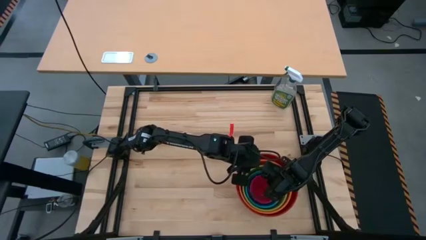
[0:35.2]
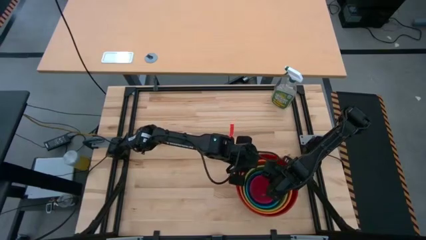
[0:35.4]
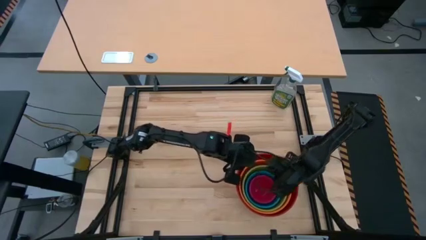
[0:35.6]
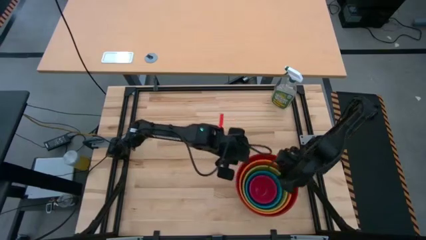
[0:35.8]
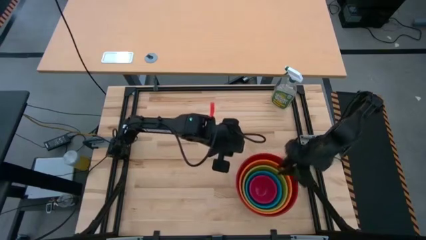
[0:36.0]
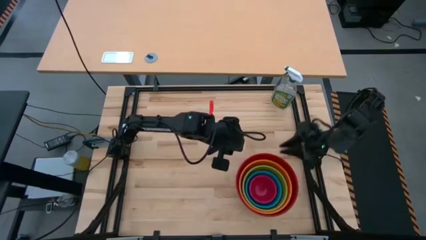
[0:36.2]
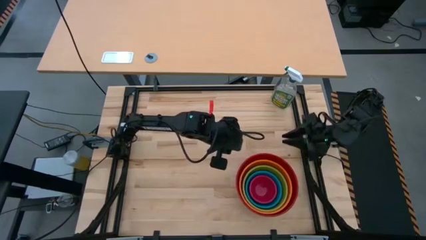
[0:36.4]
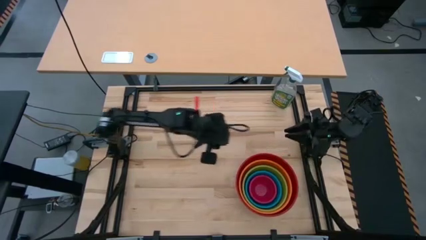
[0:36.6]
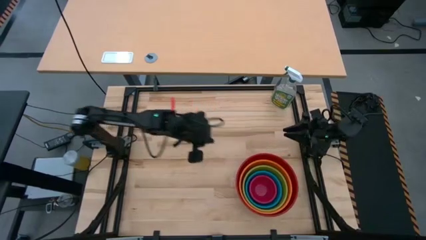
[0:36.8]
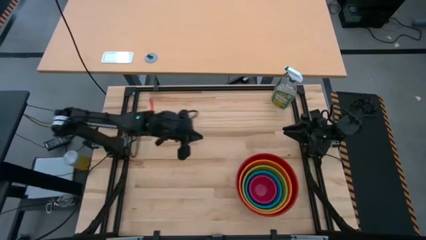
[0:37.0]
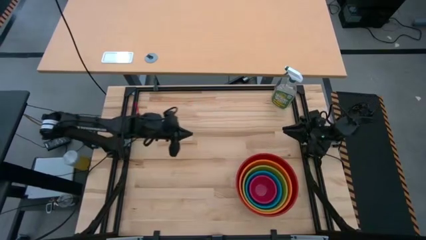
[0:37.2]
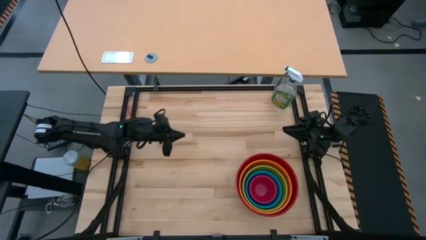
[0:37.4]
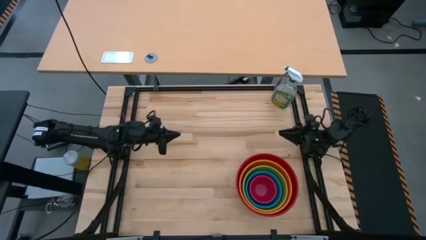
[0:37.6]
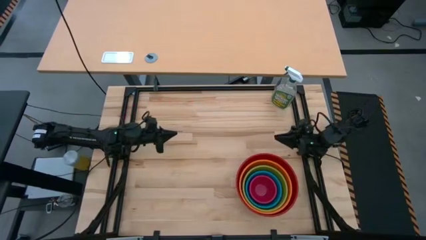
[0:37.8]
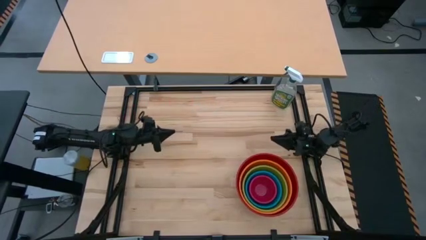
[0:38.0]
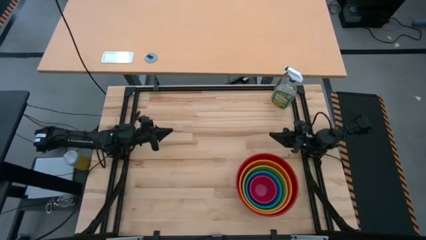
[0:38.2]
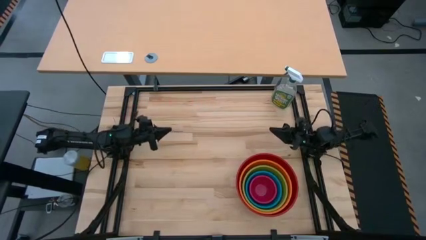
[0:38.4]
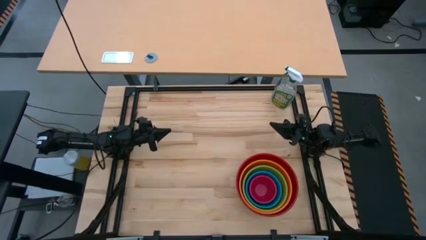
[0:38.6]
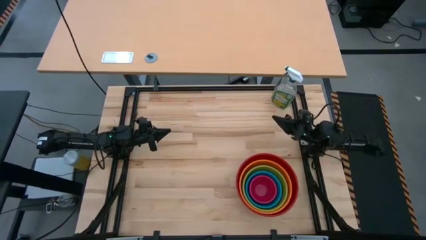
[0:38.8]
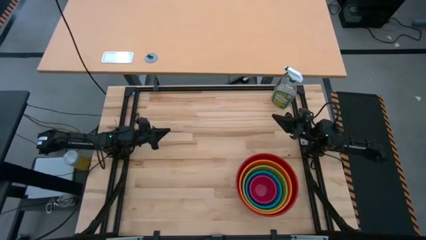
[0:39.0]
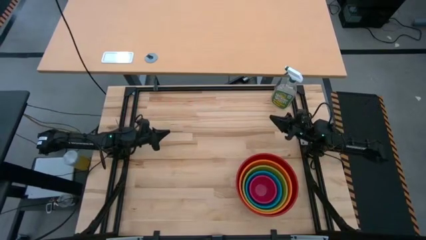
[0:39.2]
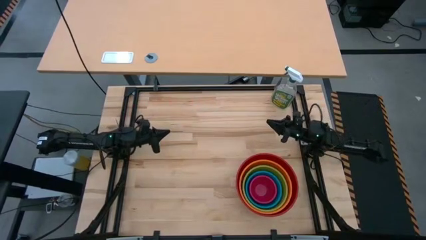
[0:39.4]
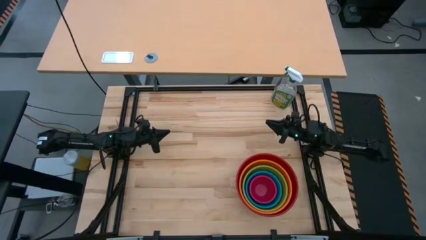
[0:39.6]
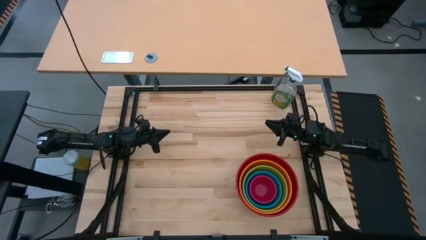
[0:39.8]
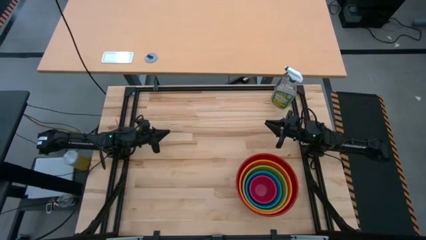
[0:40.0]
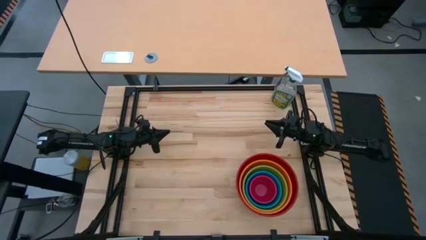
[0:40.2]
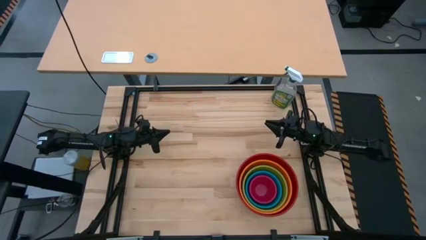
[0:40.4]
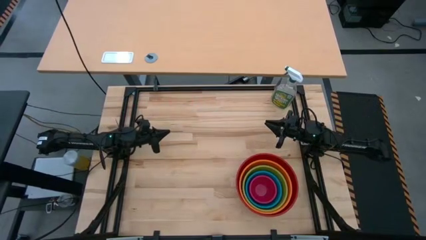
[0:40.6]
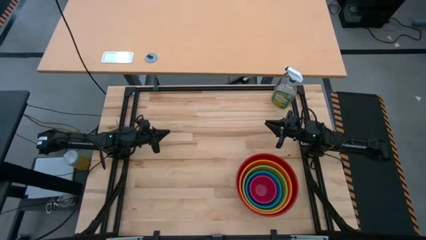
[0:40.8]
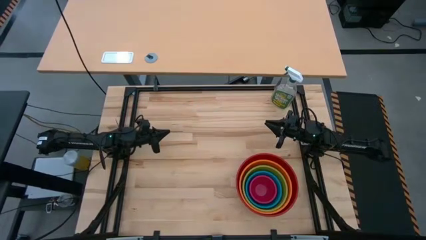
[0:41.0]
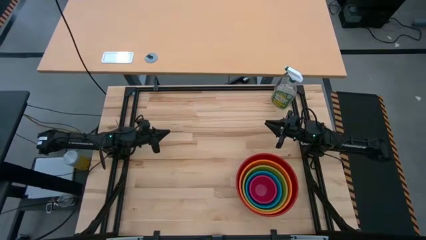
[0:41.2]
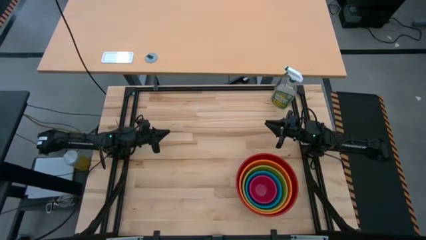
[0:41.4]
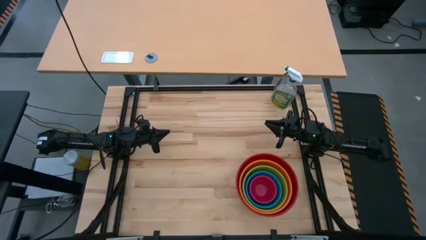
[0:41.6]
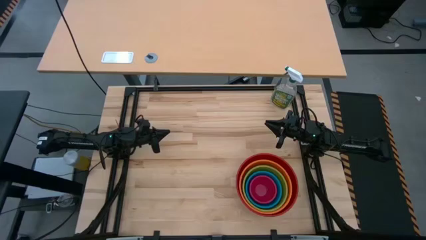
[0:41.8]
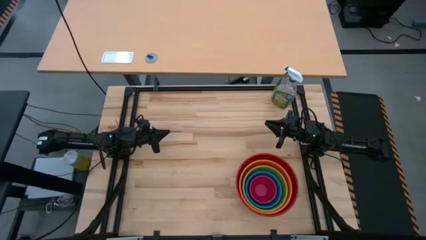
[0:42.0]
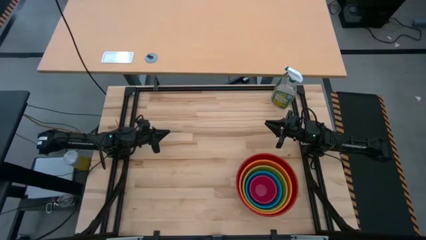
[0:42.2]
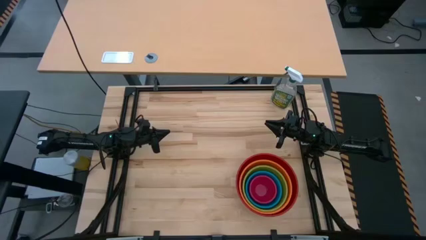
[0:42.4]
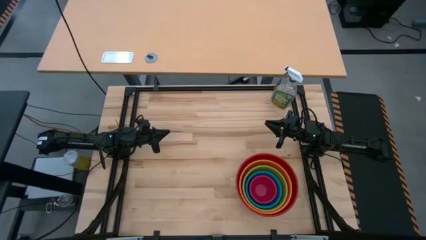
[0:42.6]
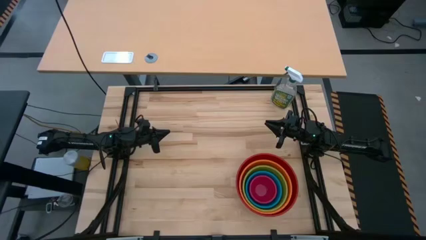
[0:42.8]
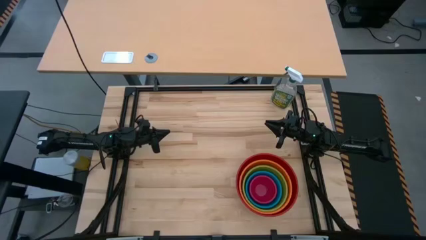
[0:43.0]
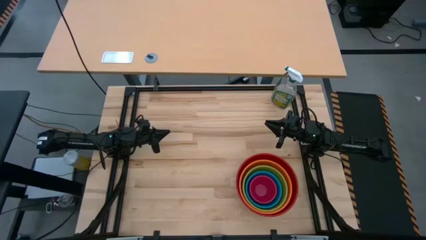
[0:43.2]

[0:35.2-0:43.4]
Task: Nest bowls inside each other by size order
Return to Home Position

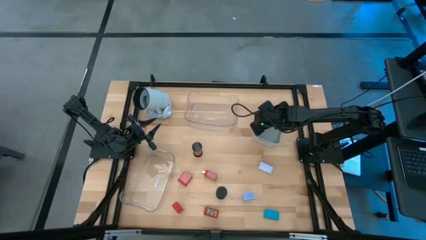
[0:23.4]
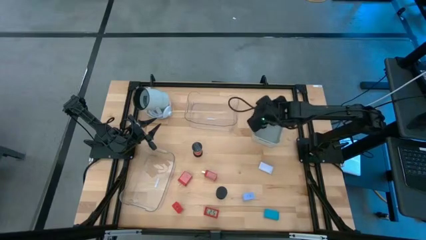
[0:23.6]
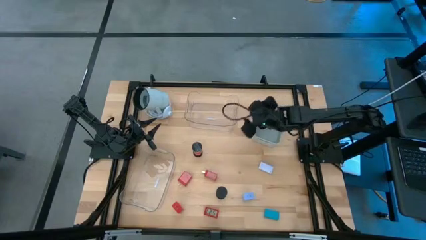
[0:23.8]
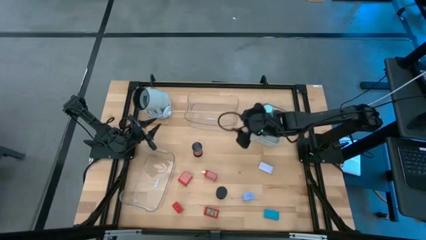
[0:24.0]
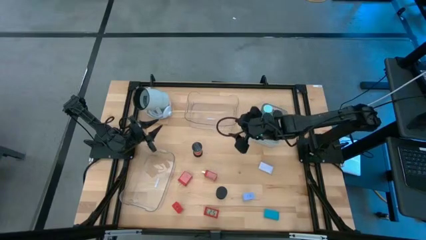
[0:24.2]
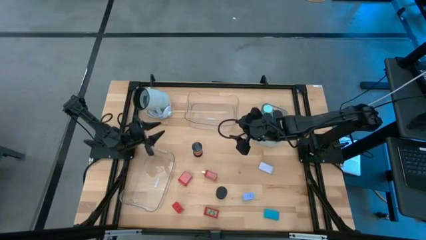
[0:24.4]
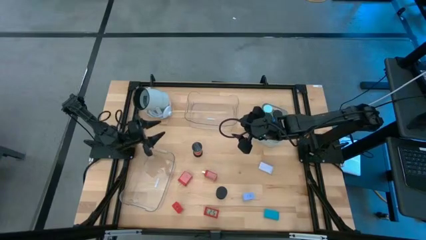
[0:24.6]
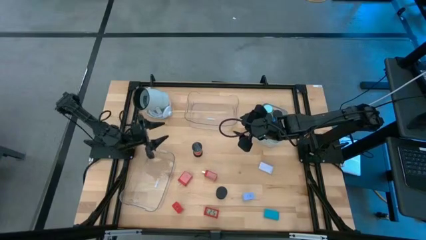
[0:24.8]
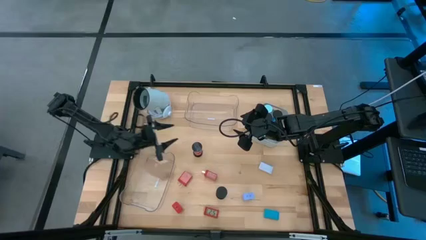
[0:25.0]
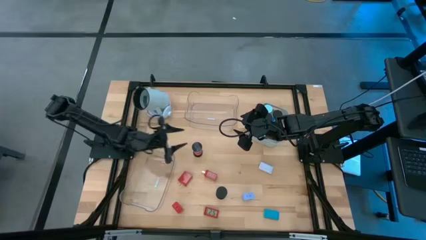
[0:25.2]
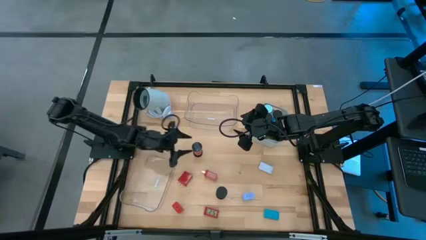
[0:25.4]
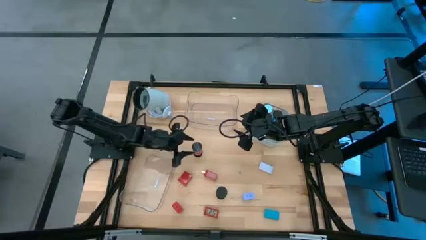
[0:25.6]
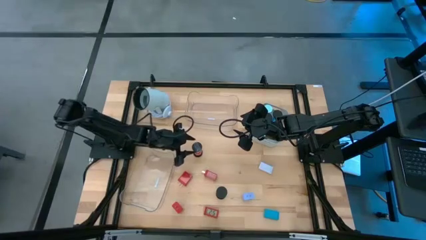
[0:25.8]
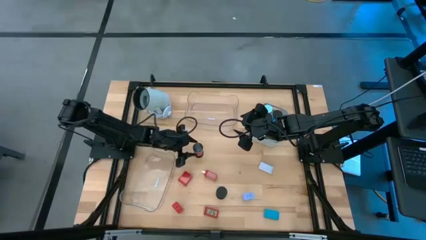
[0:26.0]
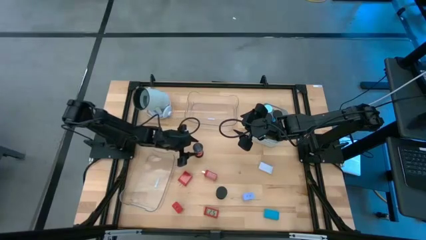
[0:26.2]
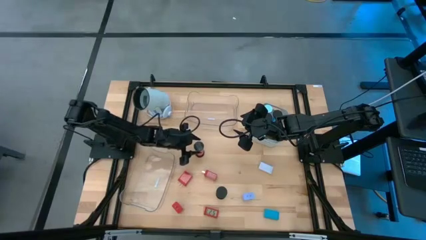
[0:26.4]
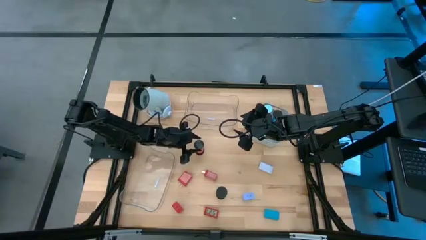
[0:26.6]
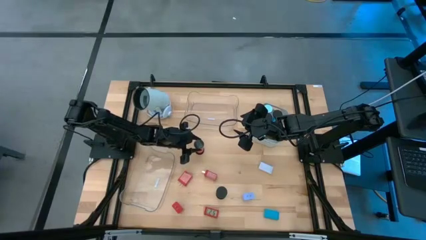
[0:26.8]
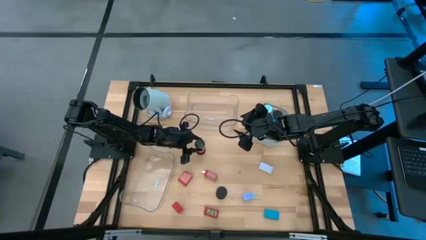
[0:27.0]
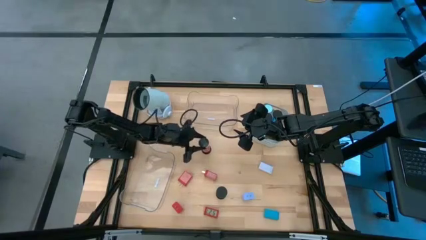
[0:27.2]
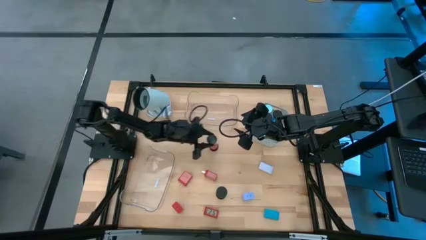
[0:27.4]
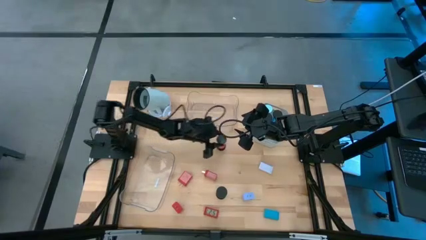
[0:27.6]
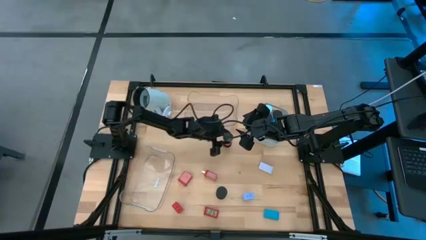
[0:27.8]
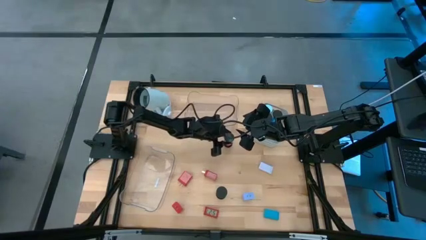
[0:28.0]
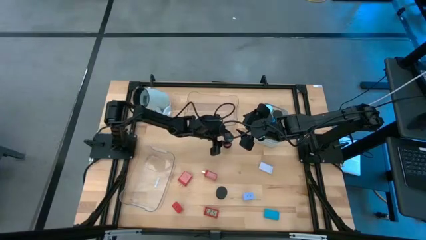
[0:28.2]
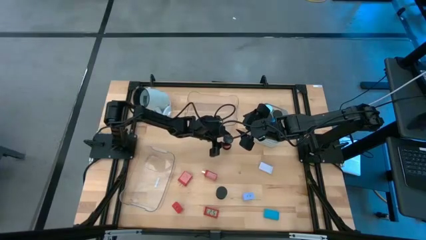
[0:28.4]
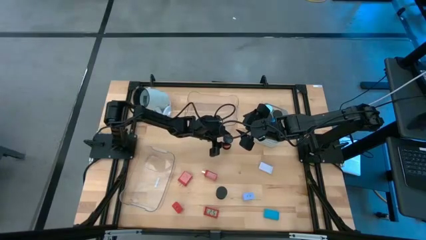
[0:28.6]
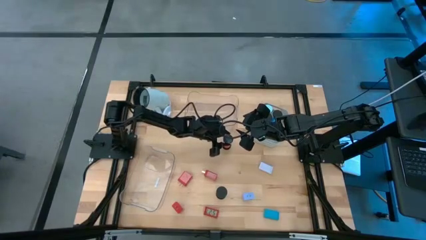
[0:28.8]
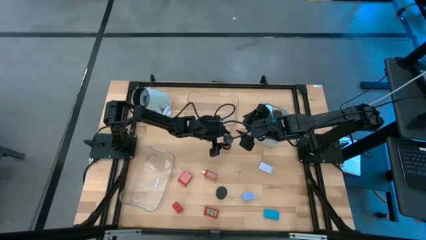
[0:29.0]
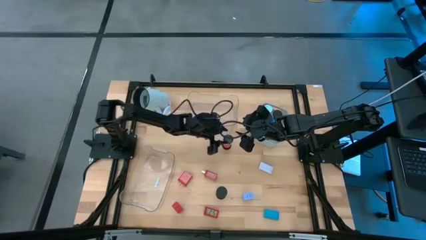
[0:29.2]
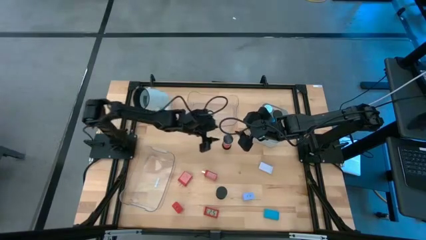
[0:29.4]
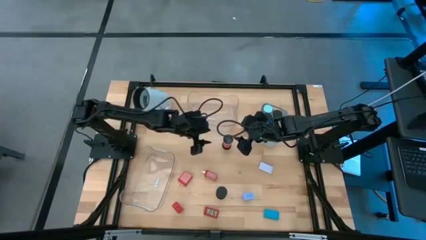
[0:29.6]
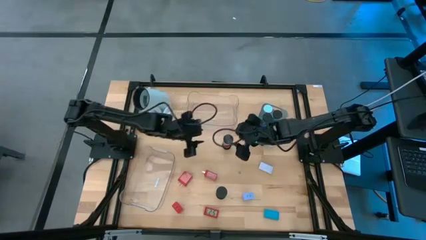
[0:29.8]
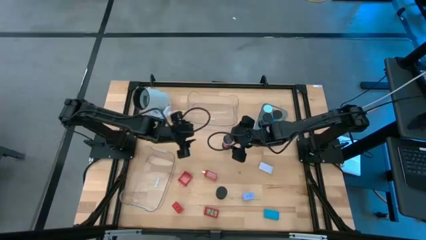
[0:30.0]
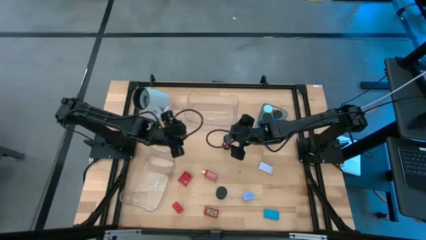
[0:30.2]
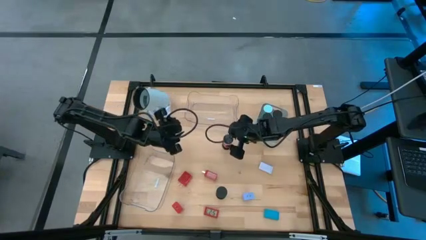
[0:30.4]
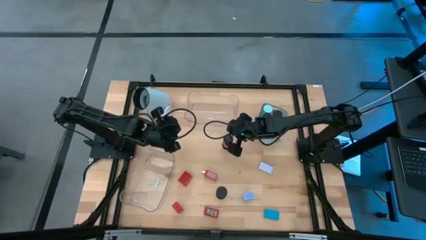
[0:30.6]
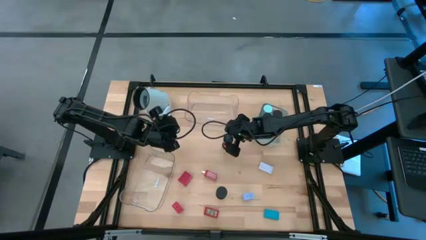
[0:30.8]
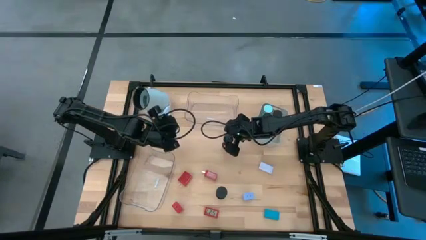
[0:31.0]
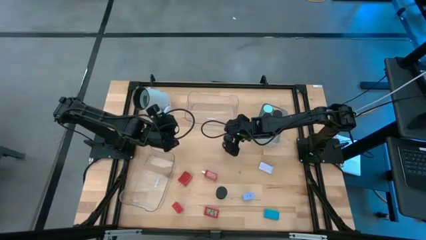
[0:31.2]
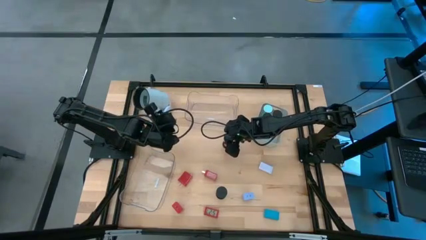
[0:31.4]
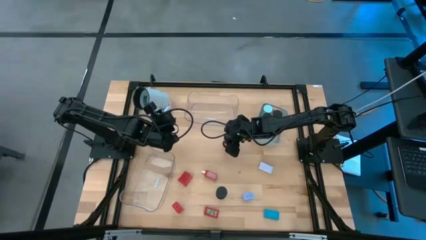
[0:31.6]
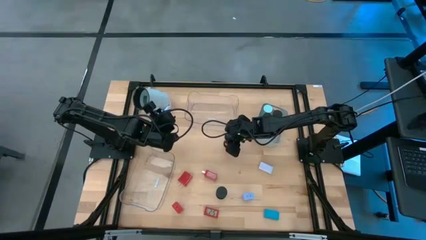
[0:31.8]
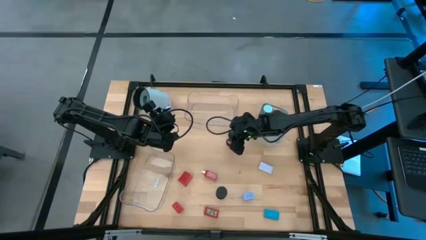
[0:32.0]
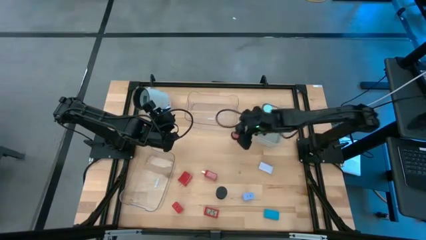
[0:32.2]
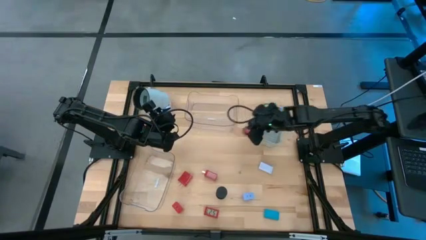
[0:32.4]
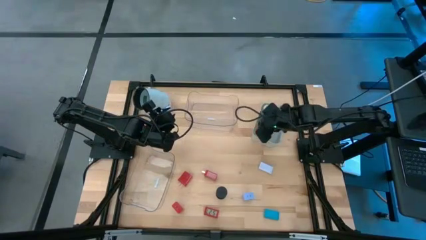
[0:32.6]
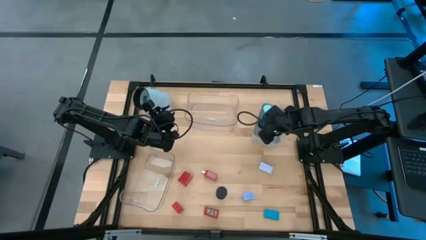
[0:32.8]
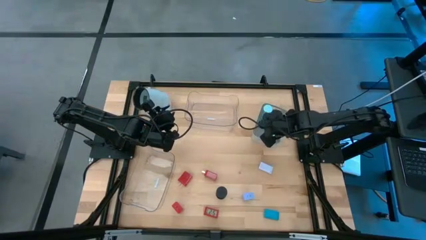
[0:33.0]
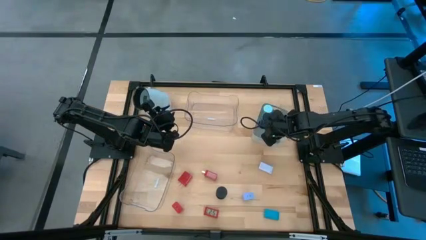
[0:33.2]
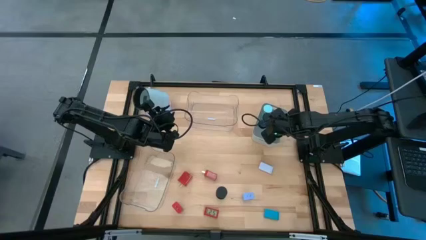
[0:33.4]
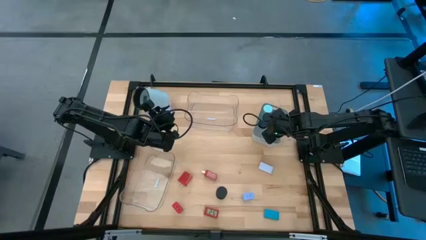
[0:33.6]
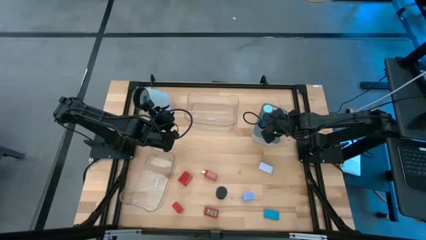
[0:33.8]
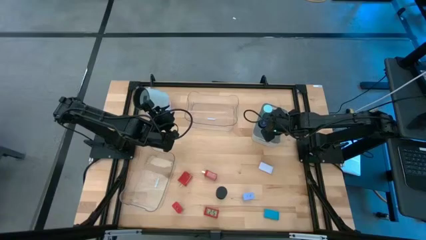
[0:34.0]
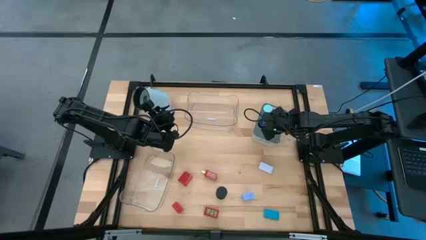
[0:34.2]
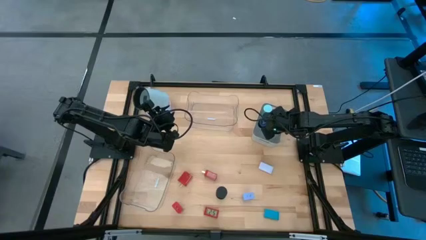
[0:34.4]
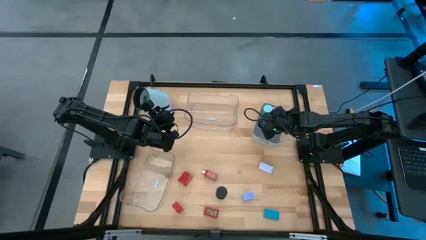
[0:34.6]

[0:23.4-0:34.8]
Task: Pick & Place Office items
Put the orange hourglass into the grey bin
